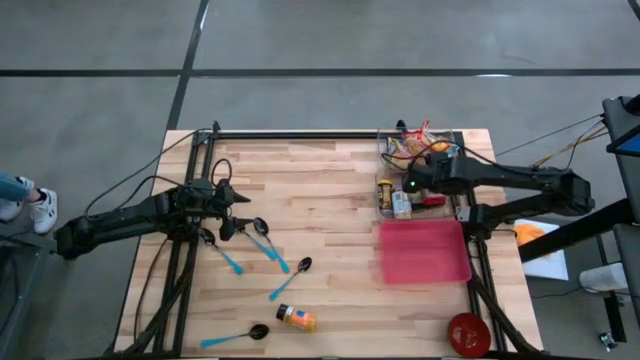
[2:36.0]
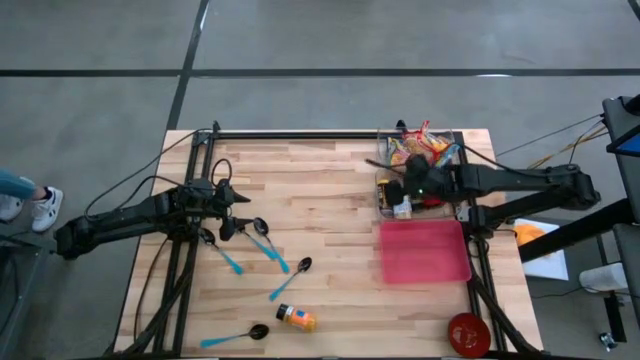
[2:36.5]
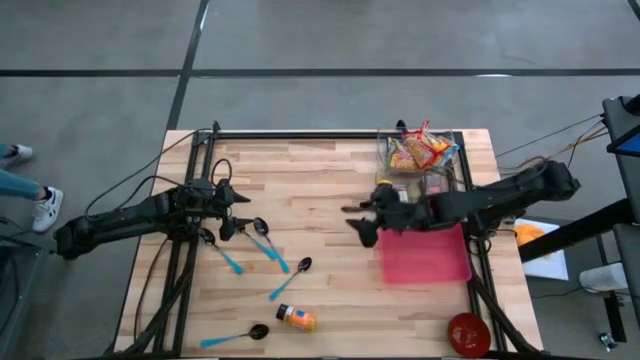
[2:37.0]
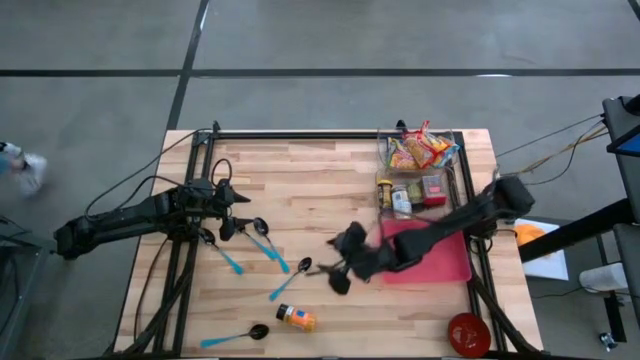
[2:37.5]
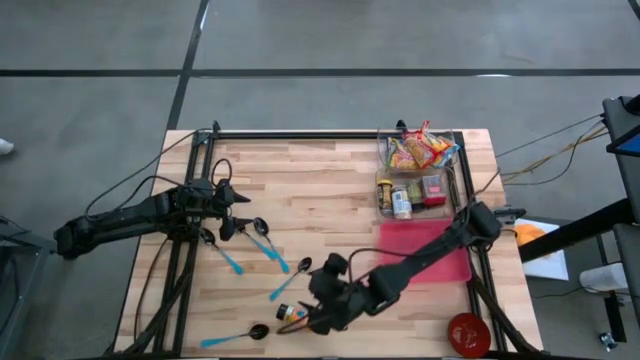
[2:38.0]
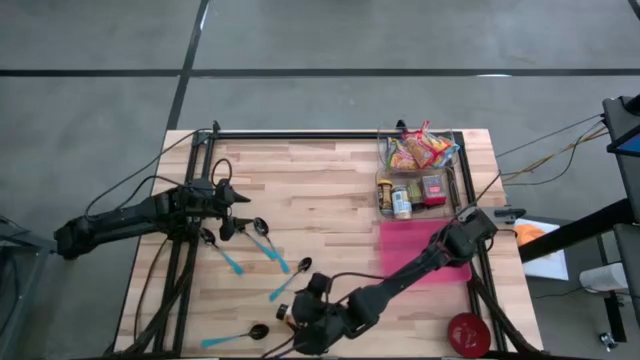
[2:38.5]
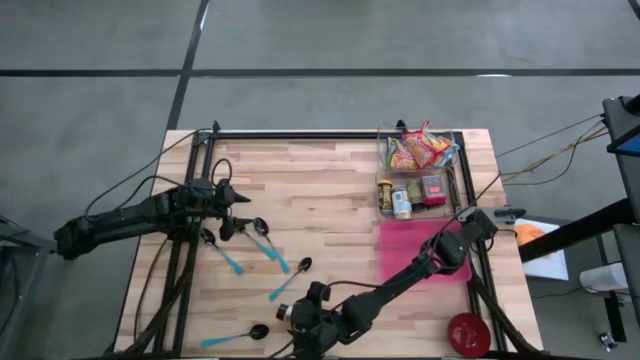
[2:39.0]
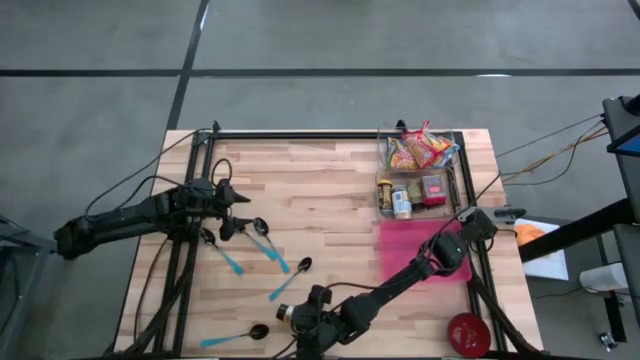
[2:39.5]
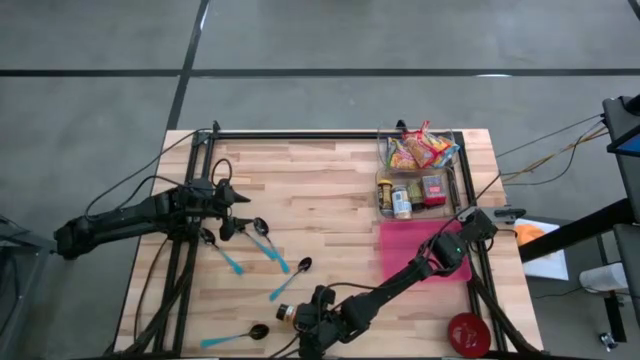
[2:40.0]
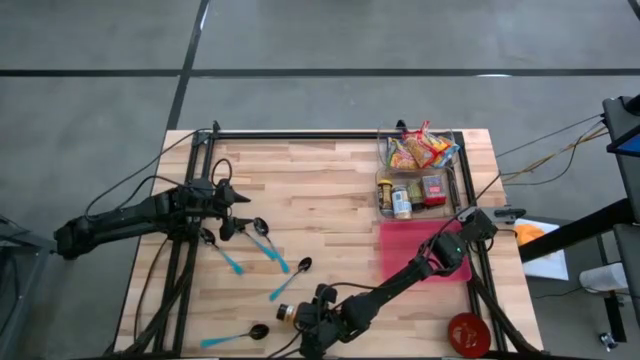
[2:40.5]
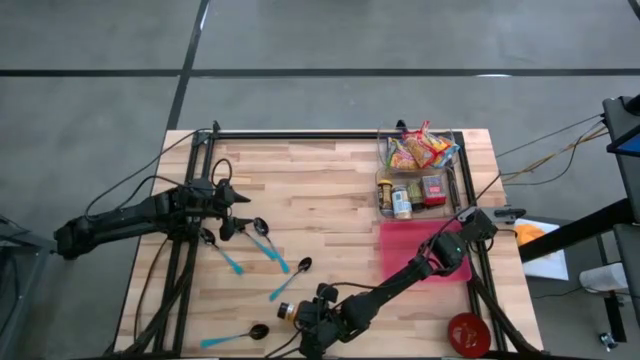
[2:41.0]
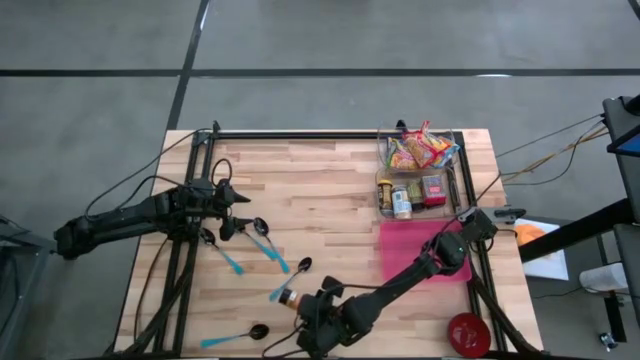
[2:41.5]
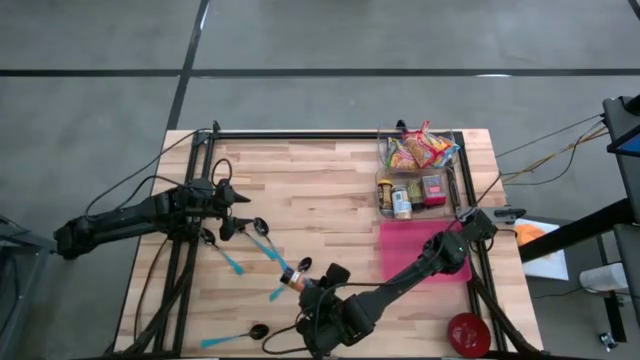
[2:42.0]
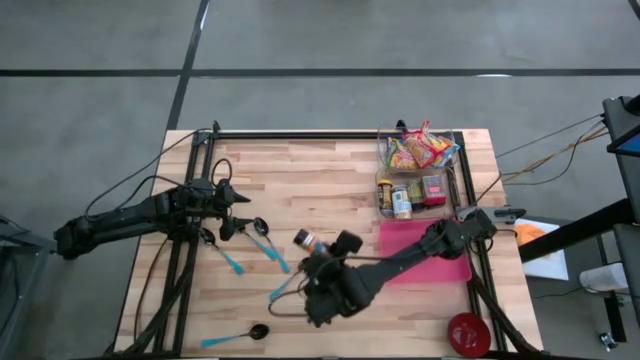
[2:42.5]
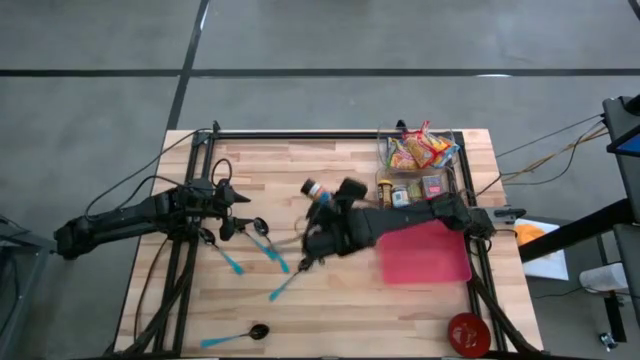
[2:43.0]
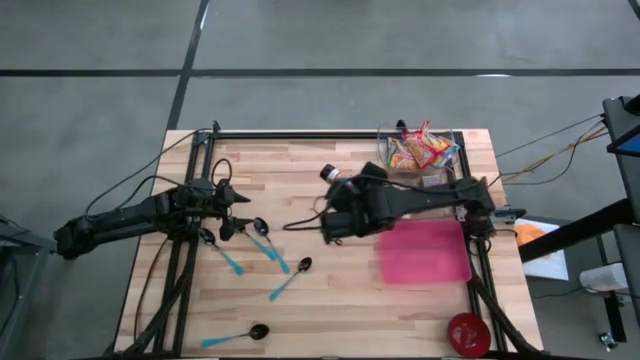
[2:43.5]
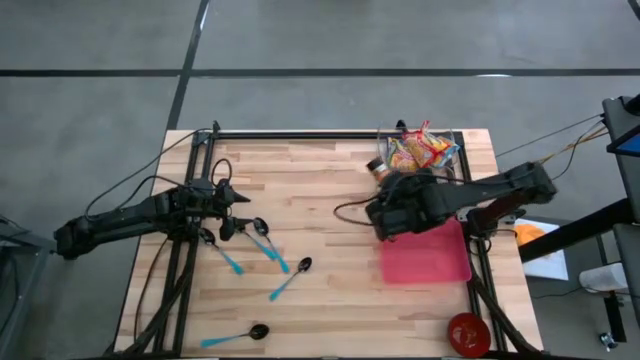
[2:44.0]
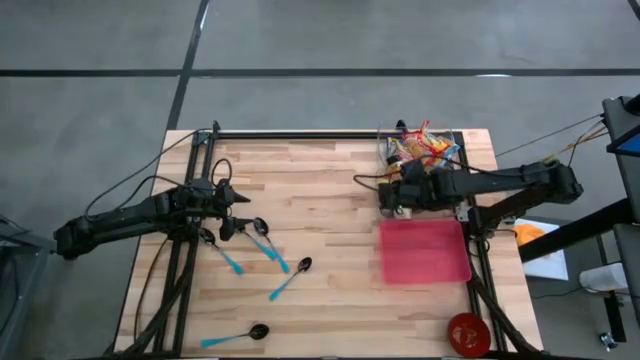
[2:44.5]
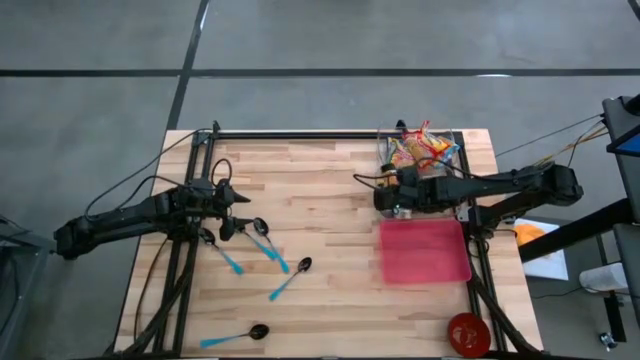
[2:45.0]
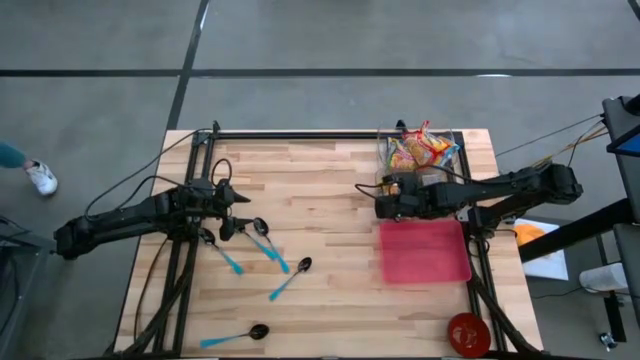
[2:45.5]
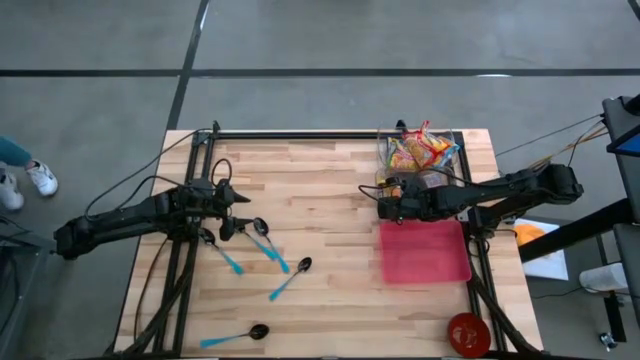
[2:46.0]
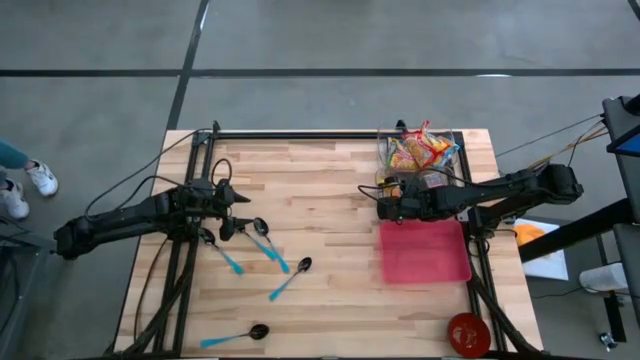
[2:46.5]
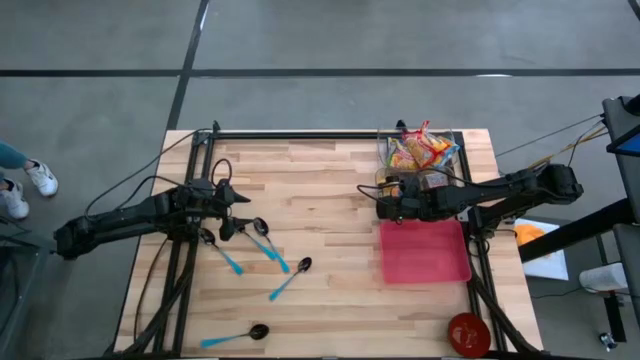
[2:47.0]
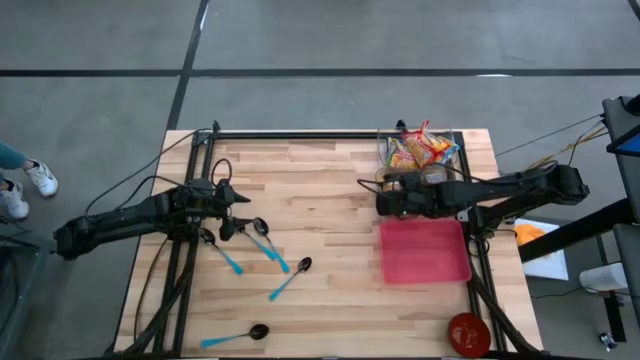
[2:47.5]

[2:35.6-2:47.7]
Put the orange seasoning bottle into the bottom transparent bin

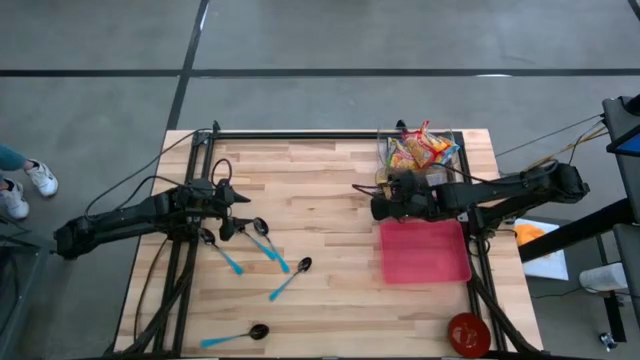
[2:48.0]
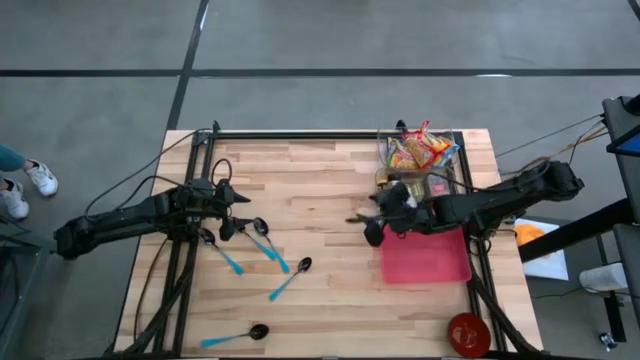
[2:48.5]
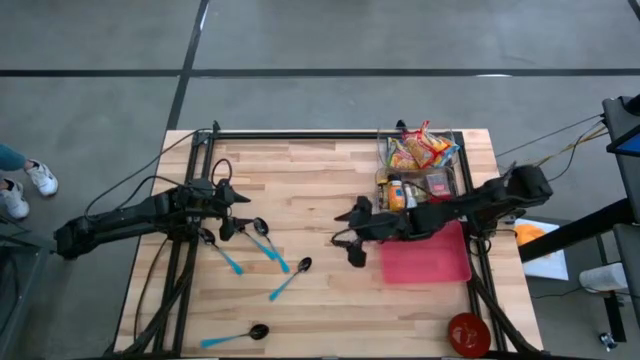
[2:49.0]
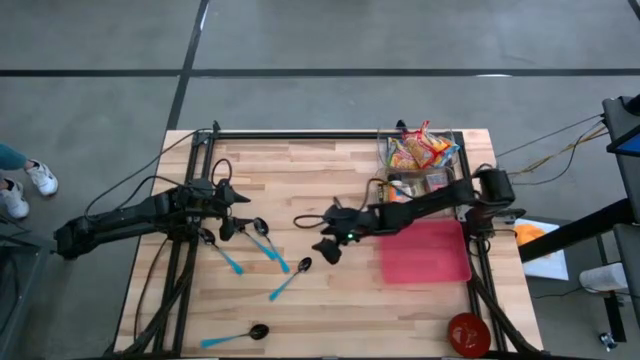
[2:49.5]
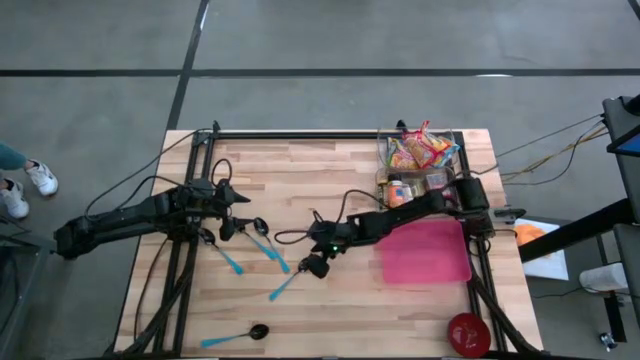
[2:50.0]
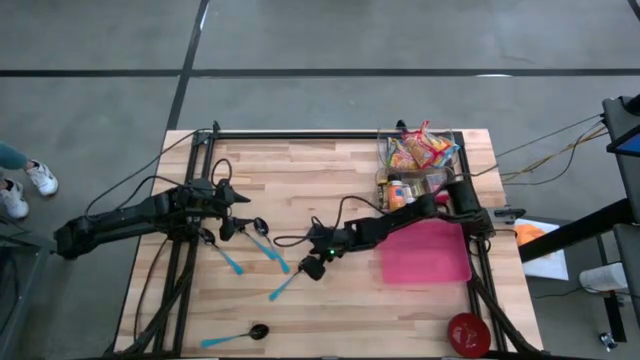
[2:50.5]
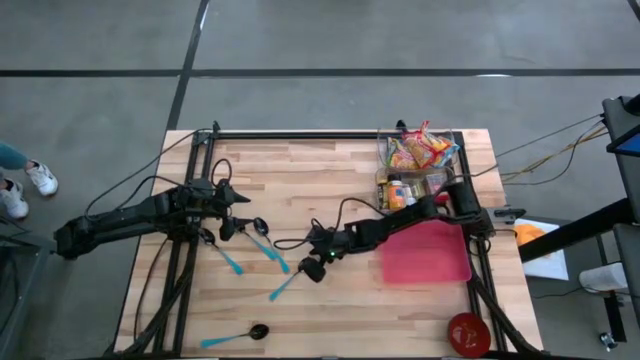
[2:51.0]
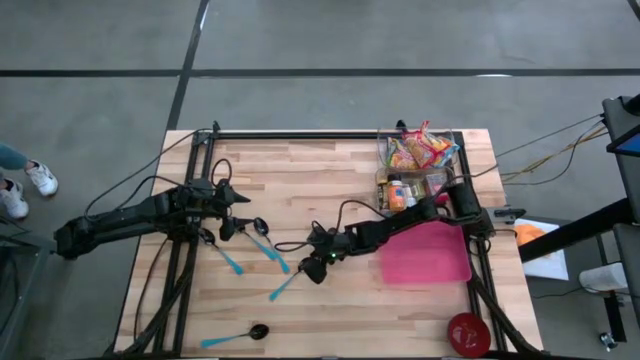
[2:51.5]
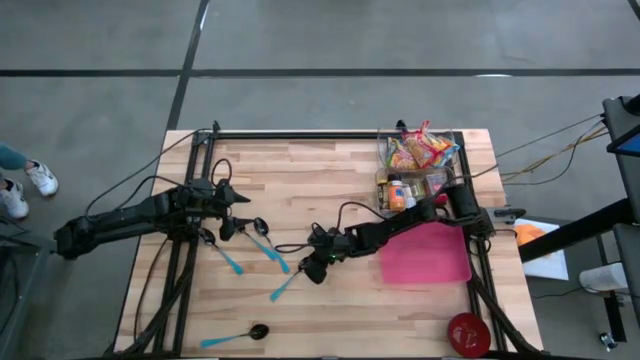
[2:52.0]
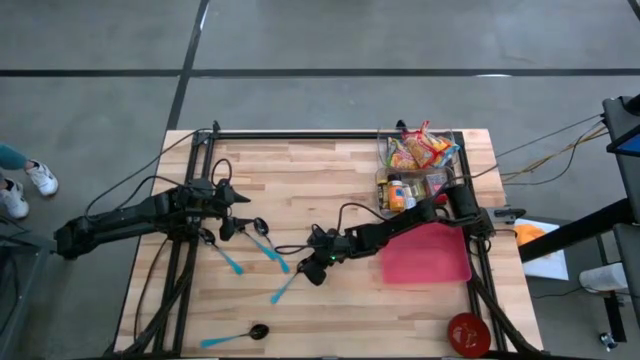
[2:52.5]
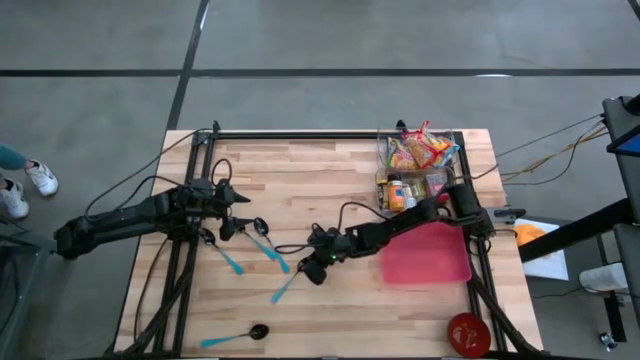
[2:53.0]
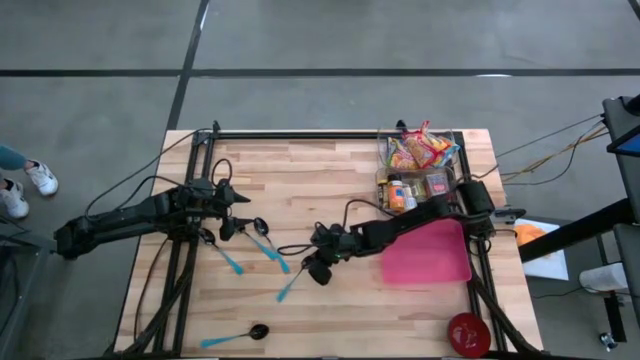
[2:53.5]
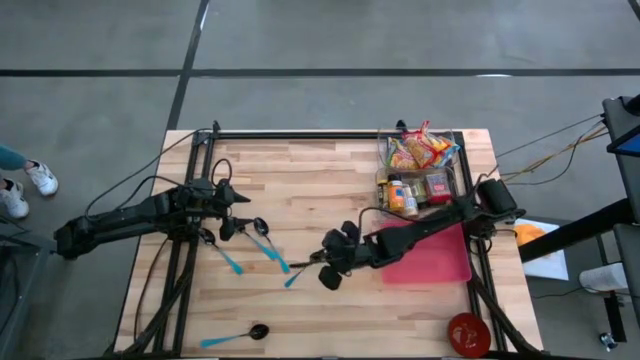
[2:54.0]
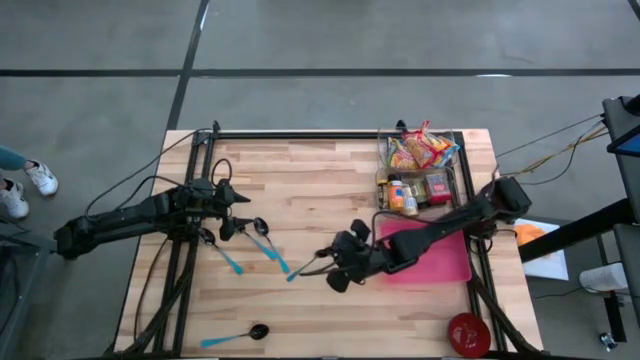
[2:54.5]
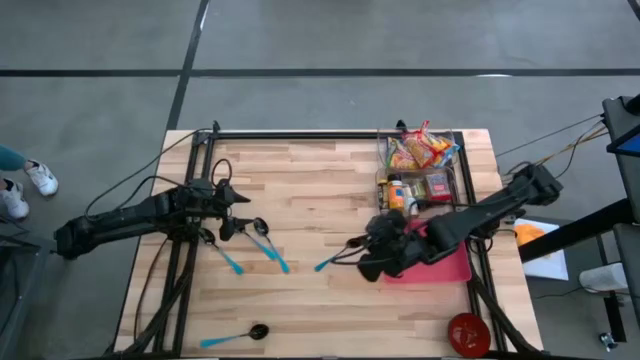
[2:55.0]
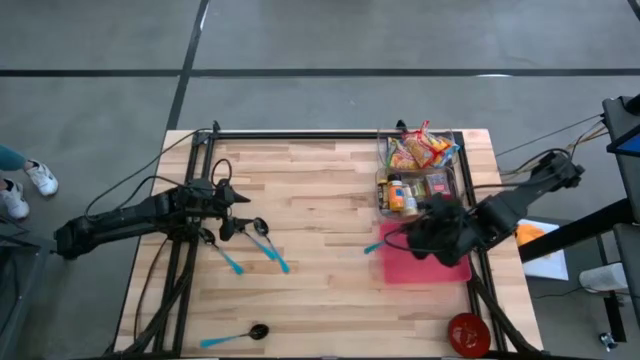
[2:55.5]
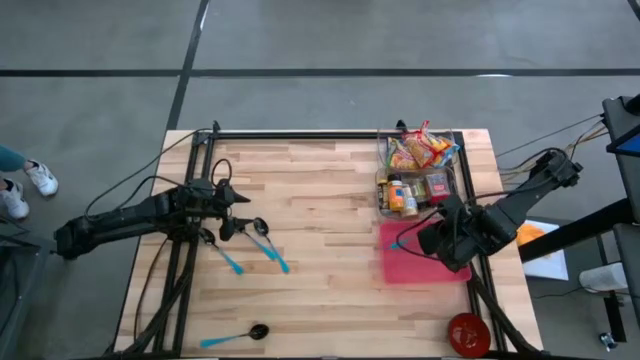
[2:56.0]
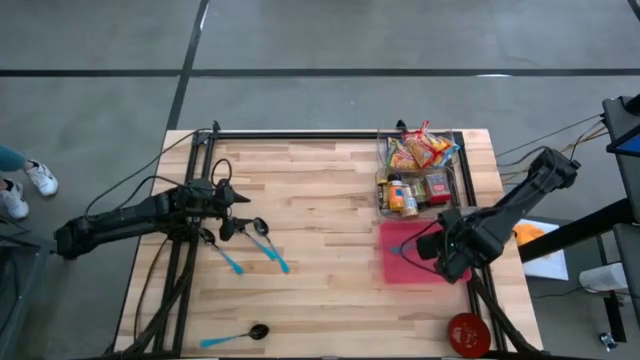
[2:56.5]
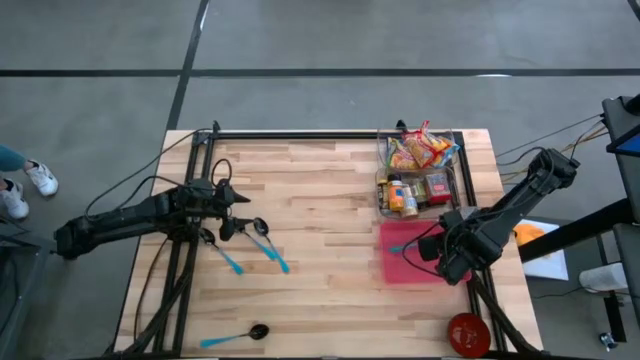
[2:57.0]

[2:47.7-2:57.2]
Put the blue spoon into the red bin
